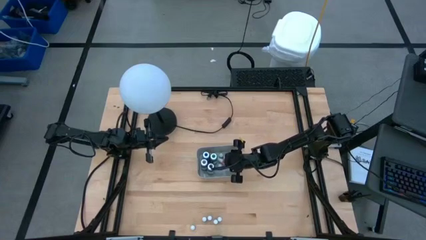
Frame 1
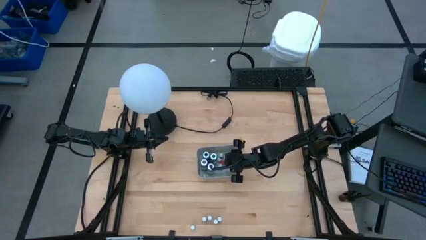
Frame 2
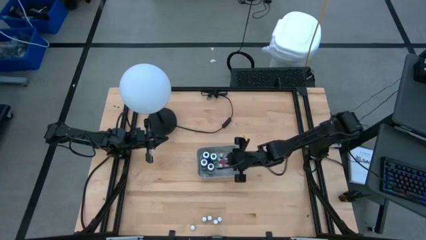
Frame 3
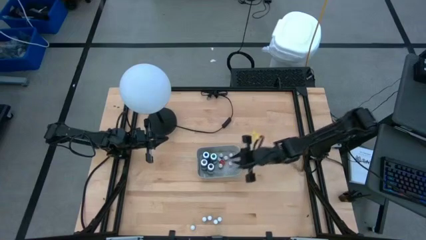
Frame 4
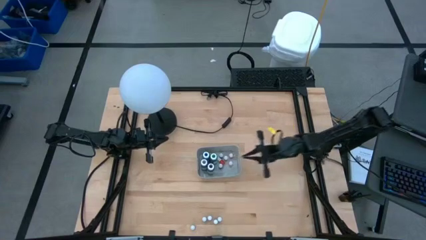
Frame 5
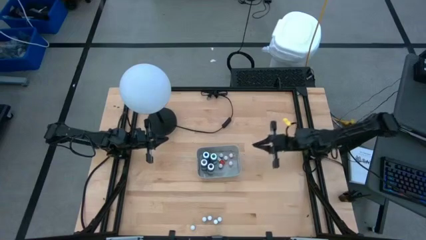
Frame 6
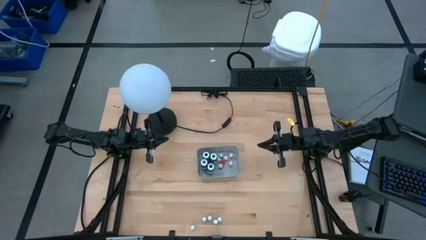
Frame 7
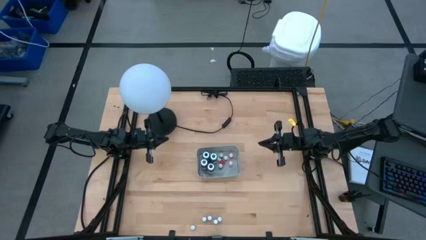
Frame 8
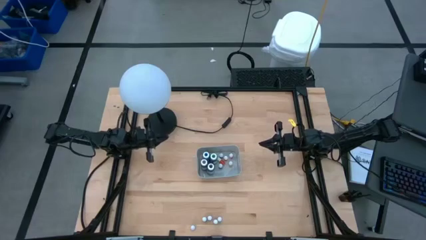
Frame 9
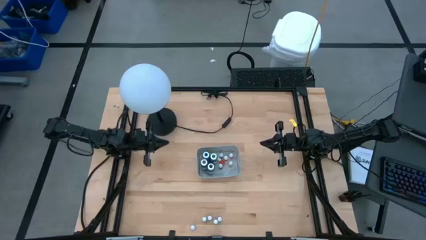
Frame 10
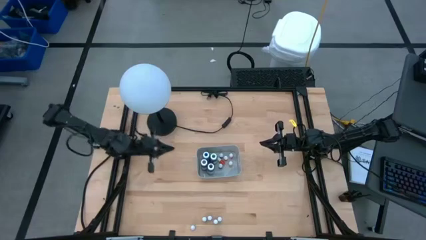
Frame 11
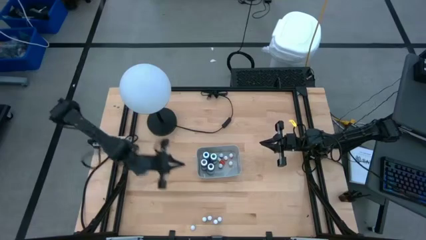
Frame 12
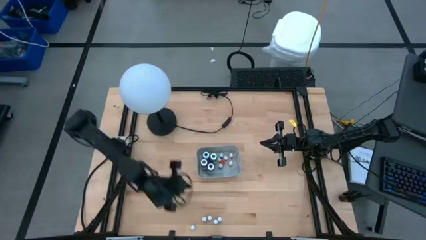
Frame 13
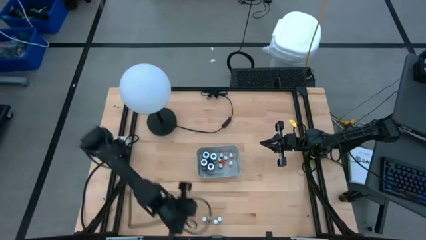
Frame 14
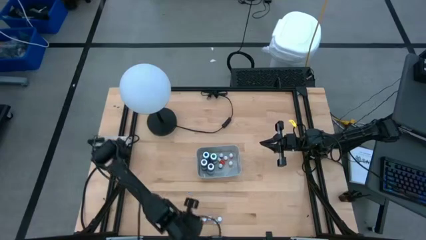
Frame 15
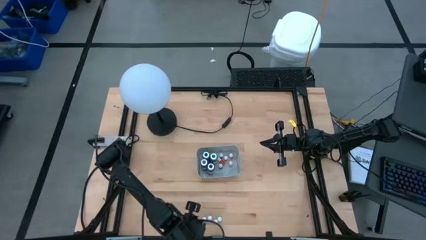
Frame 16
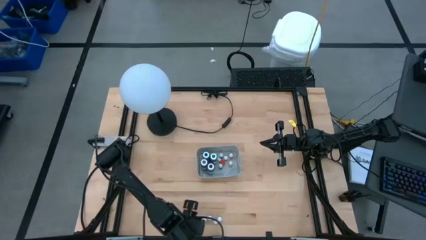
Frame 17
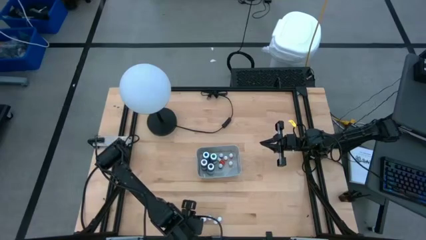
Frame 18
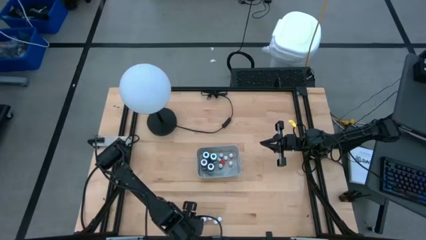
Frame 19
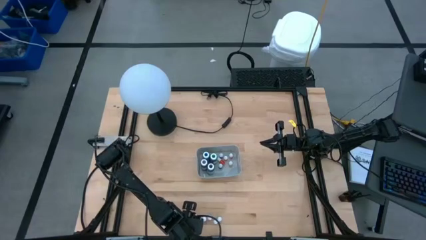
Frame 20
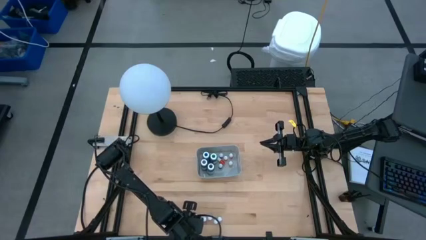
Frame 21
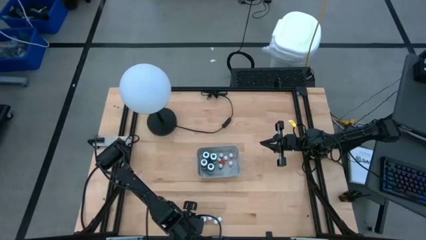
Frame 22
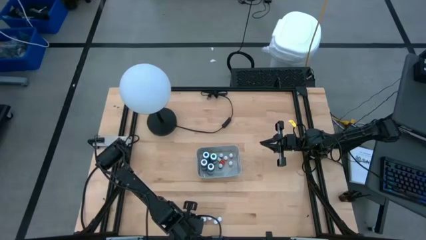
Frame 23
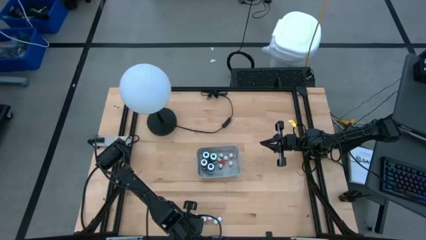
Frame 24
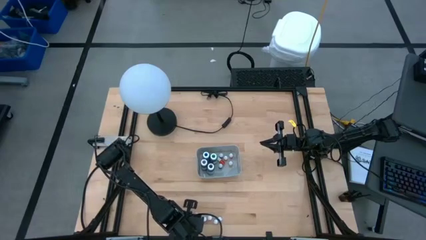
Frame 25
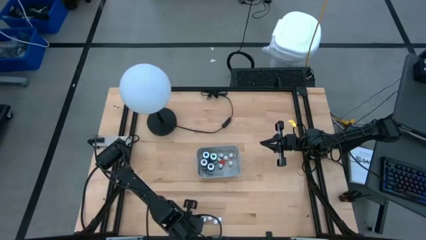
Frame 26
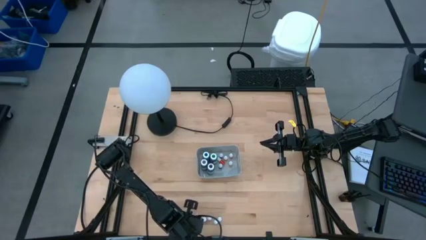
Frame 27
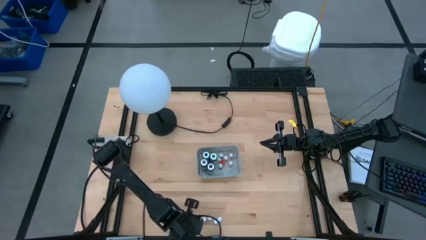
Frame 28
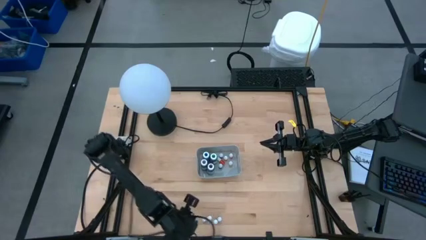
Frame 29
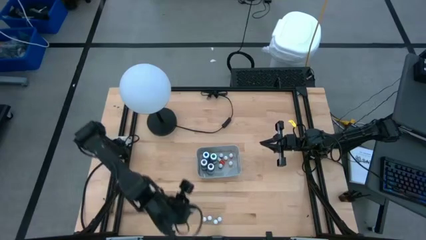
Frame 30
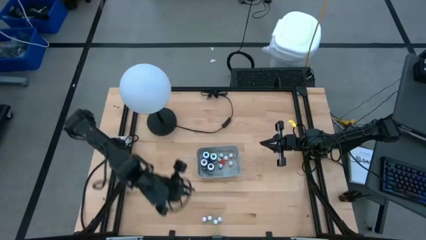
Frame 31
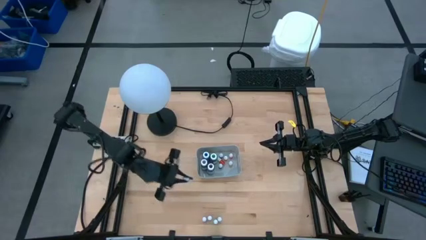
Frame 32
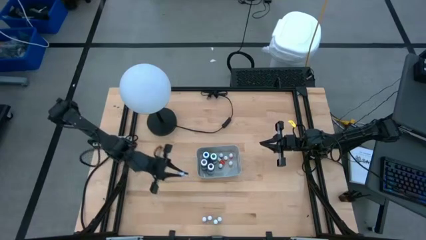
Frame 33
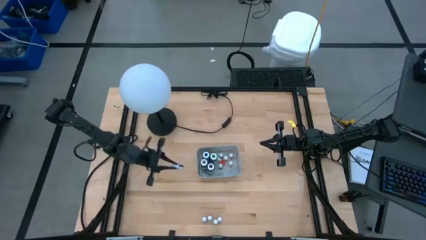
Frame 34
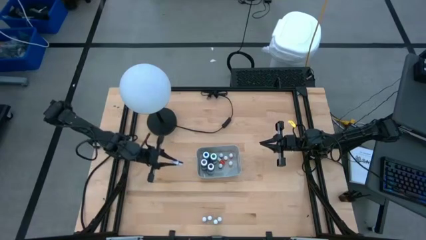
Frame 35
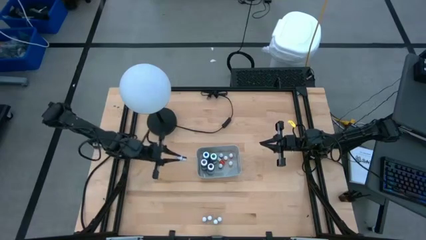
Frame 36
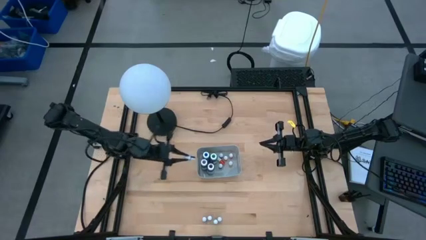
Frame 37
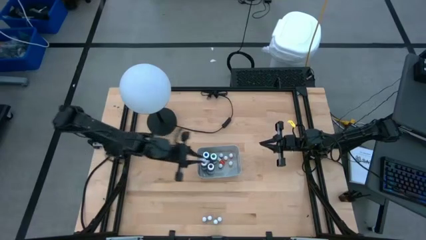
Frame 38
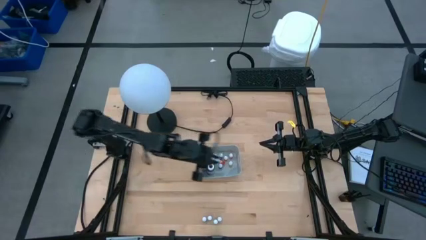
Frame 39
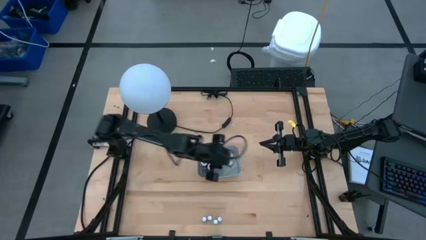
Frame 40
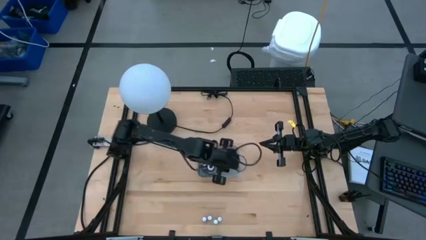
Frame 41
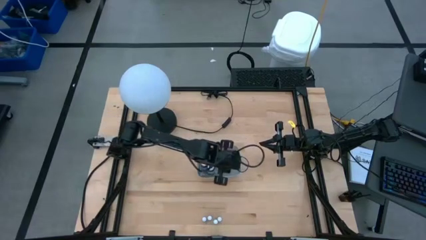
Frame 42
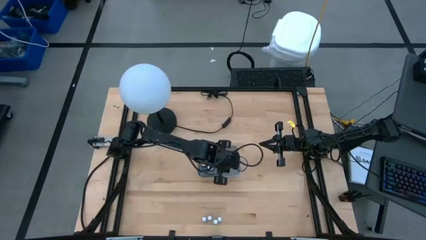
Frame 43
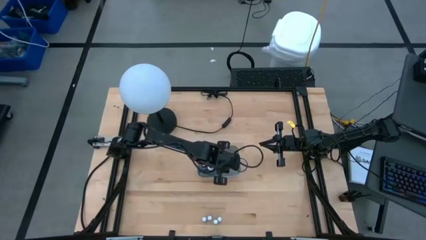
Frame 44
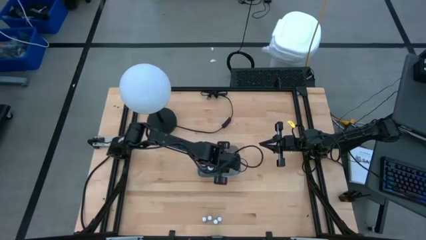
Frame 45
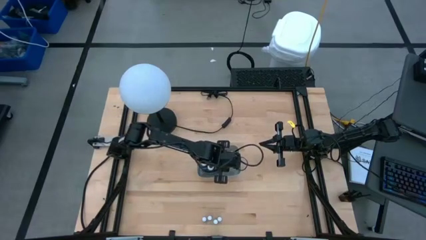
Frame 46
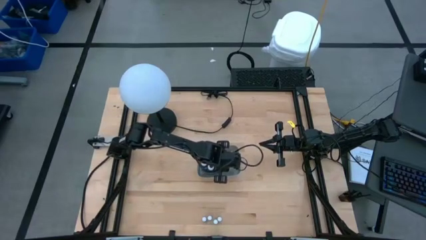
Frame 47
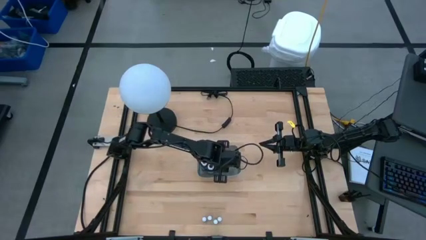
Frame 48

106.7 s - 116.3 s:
Task: Pick & Place food coloring
Put the small dark blue food coloring bottle into the gray bin

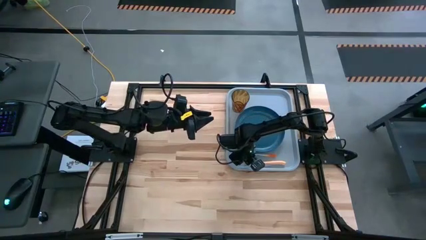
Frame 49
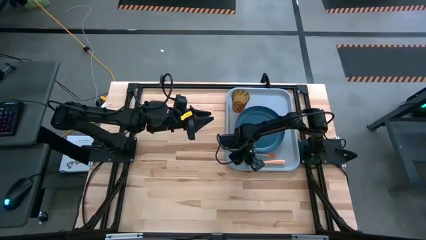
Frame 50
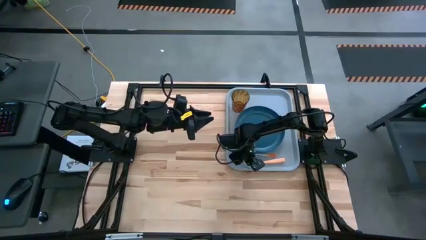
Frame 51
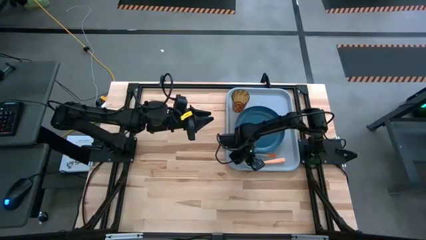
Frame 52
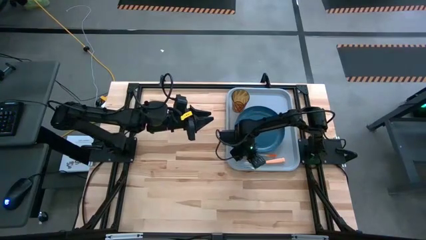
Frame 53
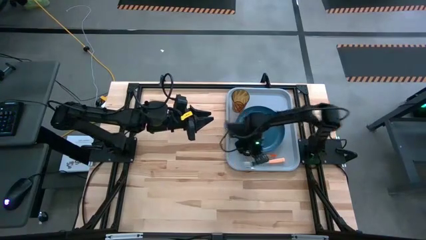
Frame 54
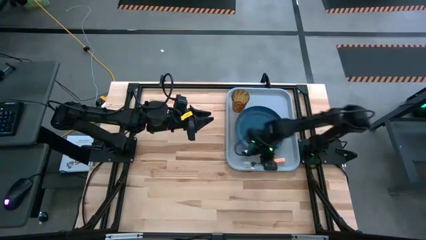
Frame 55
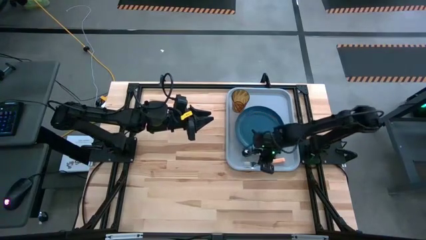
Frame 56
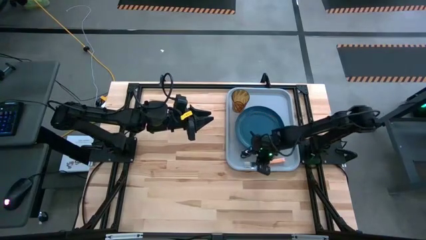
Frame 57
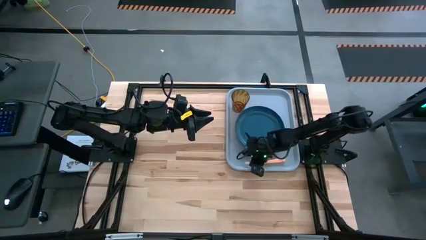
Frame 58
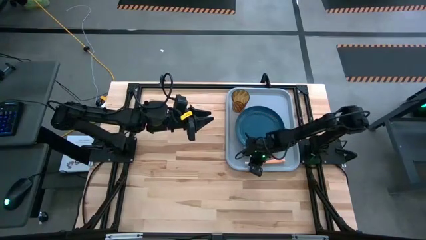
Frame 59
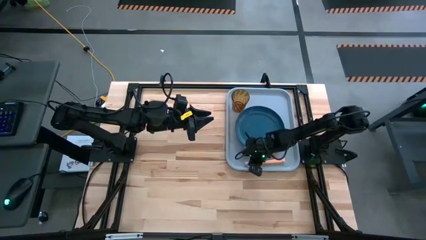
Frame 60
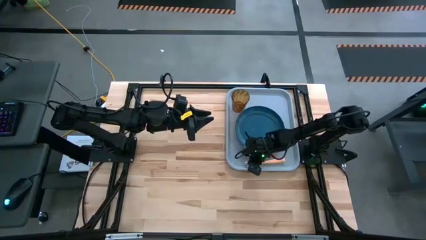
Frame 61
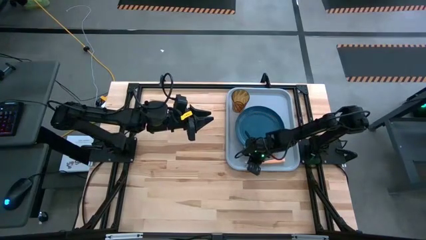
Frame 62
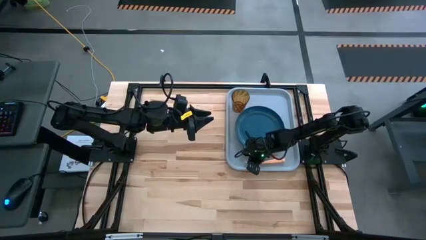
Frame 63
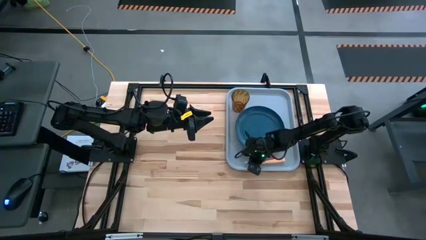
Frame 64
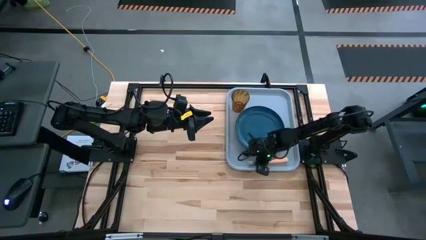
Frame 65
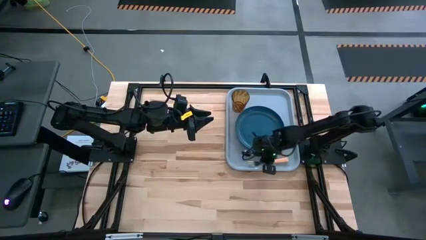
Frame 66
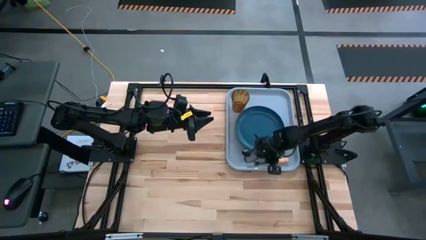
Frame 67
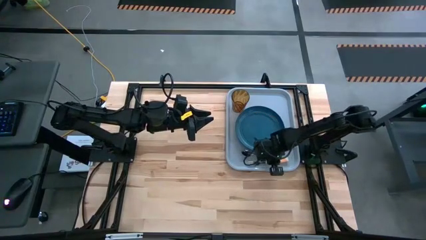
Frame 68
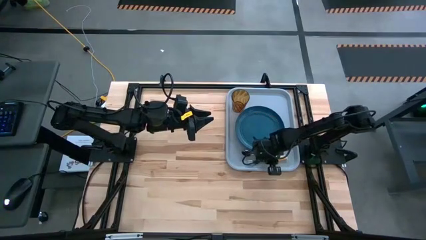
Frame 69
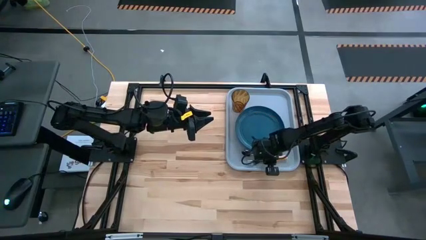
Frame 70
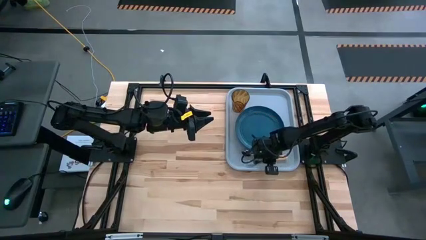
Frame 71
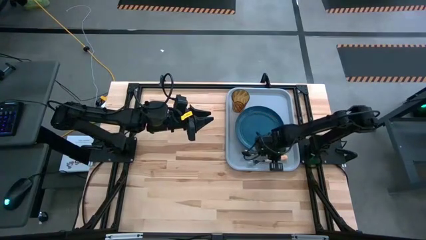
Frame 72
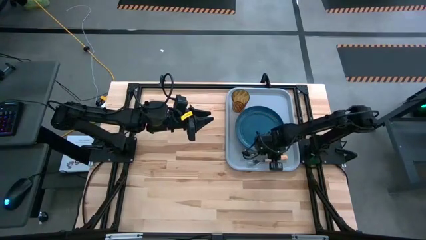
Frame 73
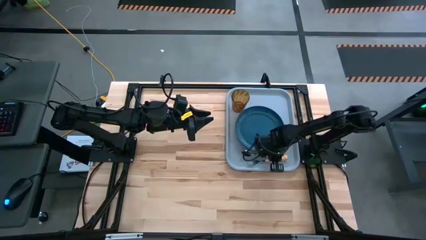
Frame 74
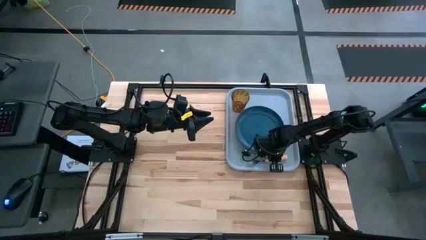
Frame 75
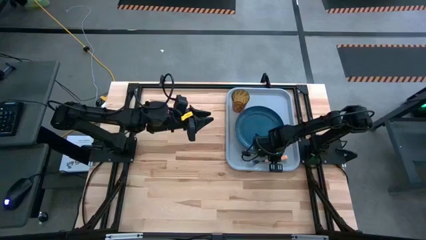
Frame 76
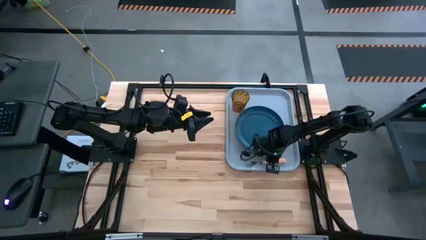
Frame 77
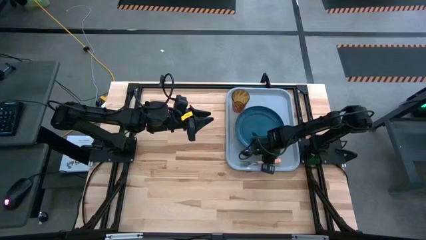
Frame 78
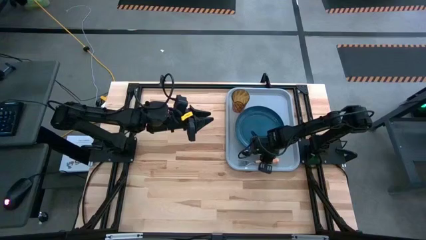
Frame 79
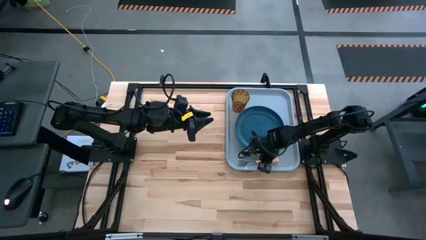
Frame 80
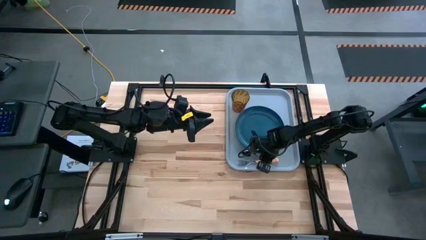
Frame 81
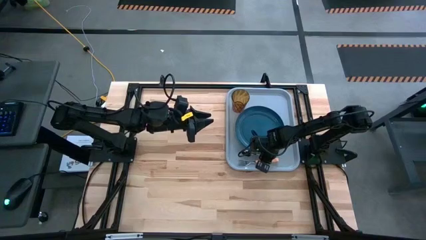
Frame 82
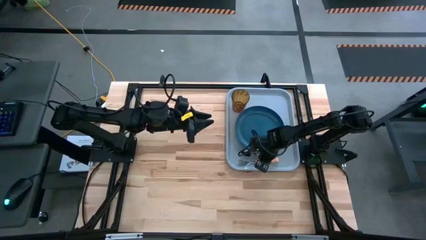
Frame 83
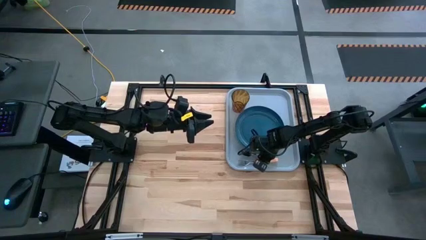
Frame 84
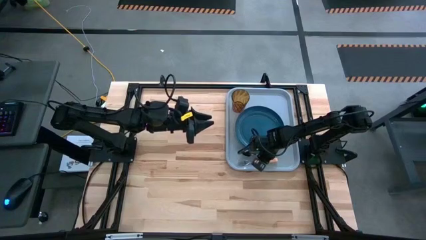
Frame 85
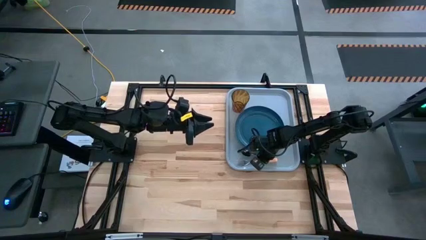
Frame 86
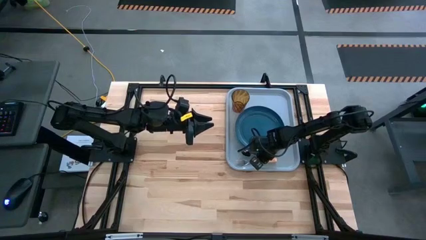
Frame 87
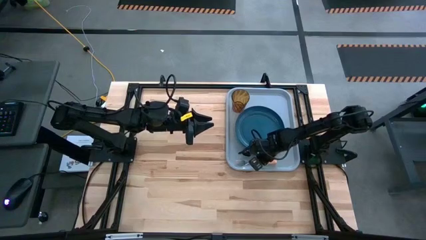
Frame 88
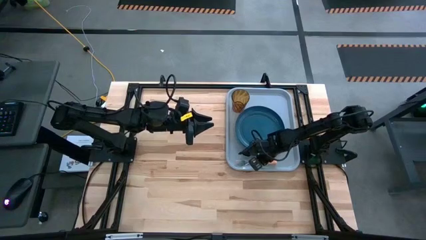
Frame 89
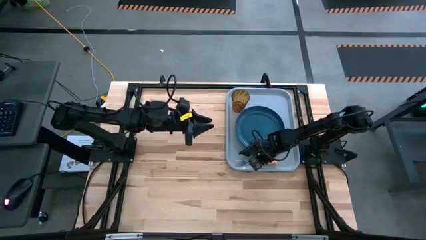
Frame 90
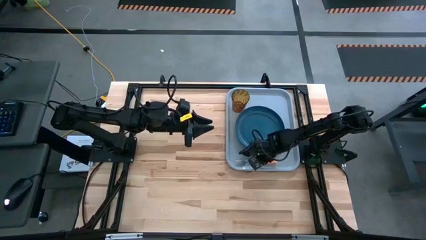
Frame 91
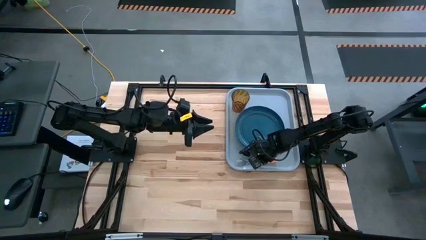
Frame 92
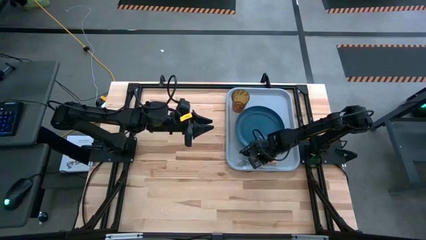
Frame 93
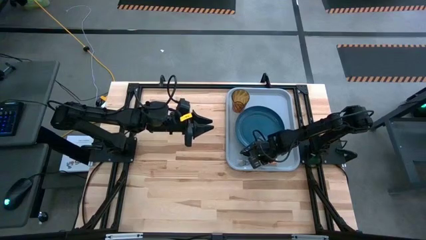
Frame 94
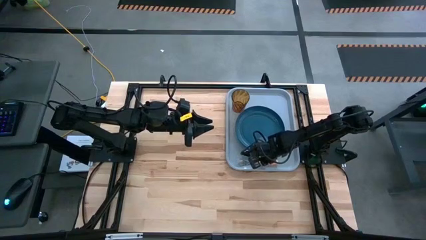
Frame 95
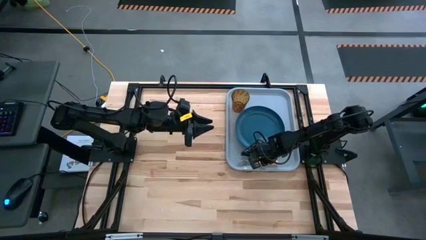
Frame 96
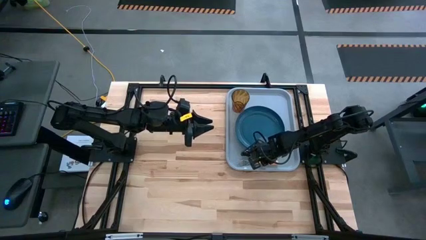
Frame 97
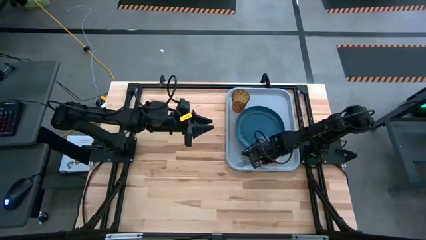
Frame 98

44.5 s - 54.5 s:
Task: Pick and place plate/cup/fork/spoon on tray
Put the light orange fork on the gray tray to the bottom of the orange spoon
